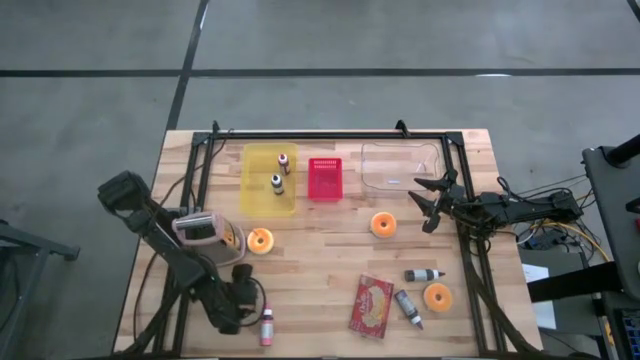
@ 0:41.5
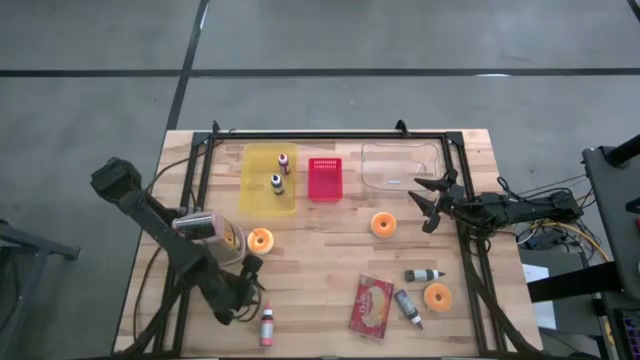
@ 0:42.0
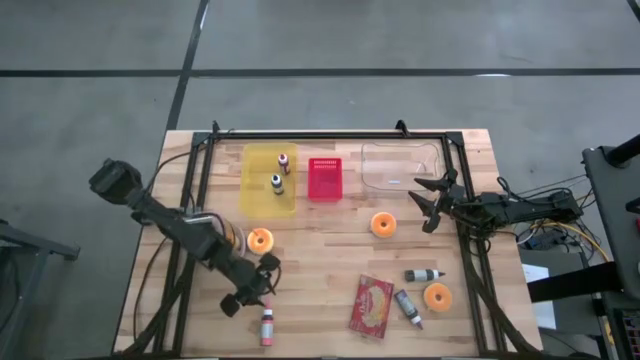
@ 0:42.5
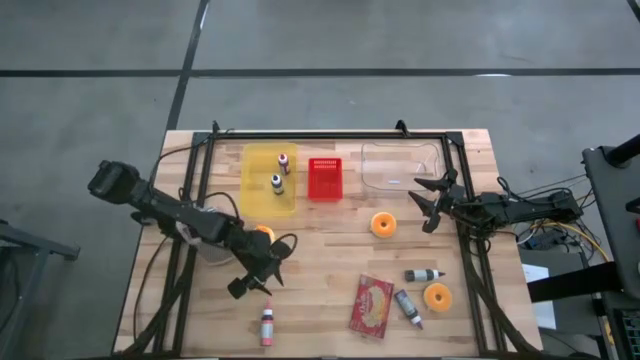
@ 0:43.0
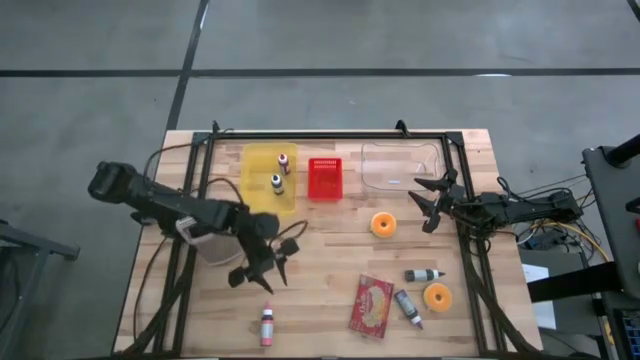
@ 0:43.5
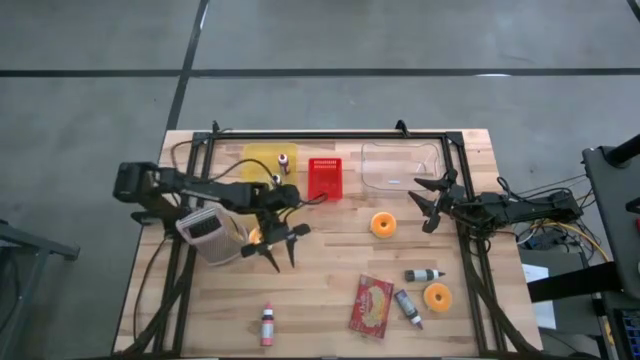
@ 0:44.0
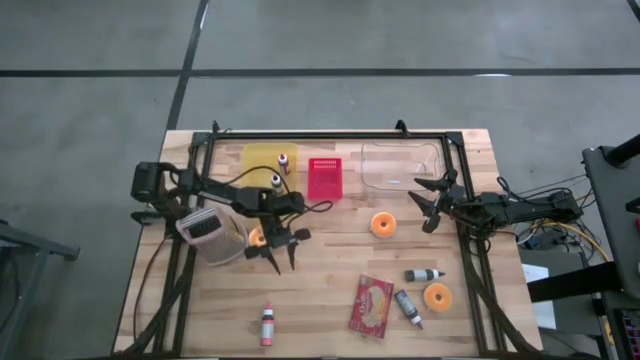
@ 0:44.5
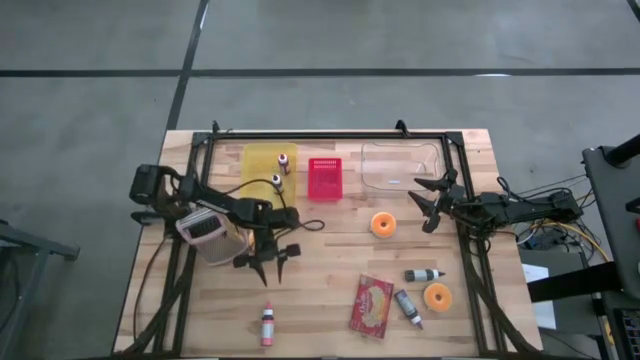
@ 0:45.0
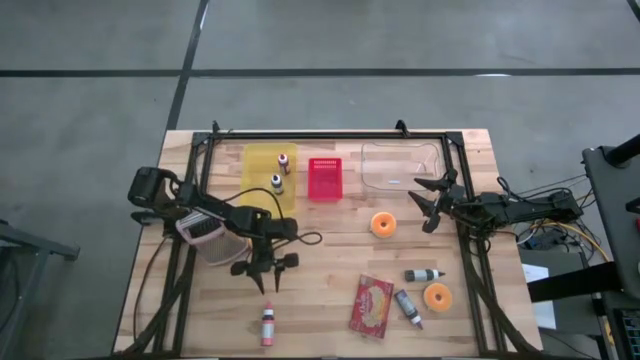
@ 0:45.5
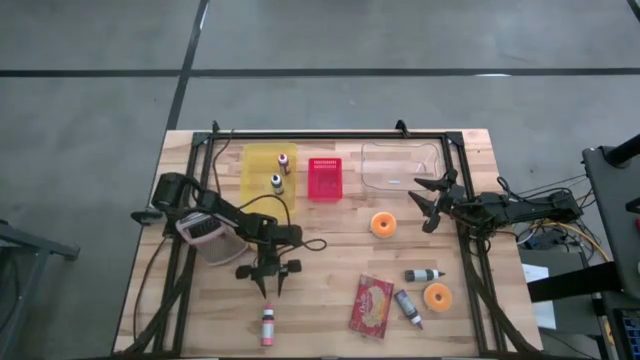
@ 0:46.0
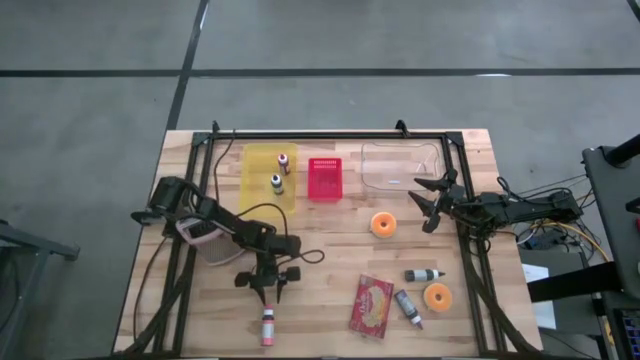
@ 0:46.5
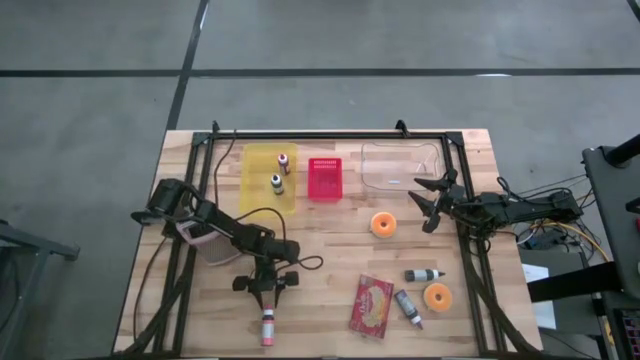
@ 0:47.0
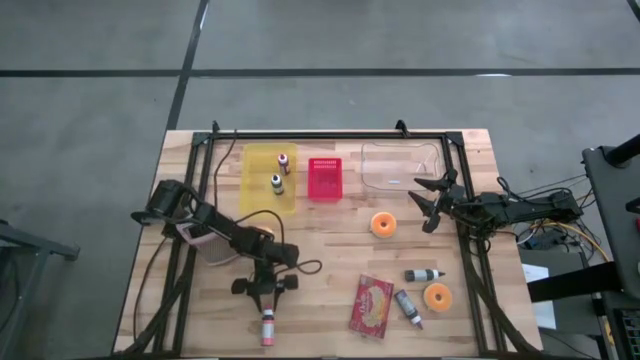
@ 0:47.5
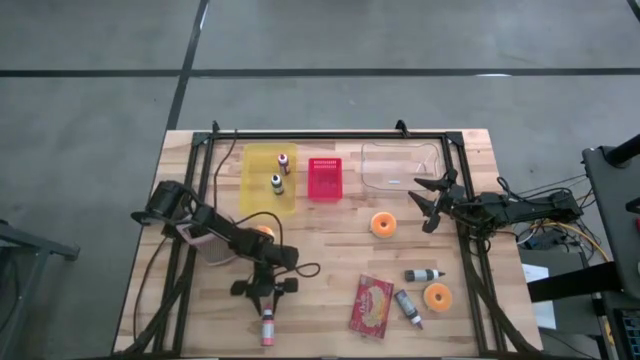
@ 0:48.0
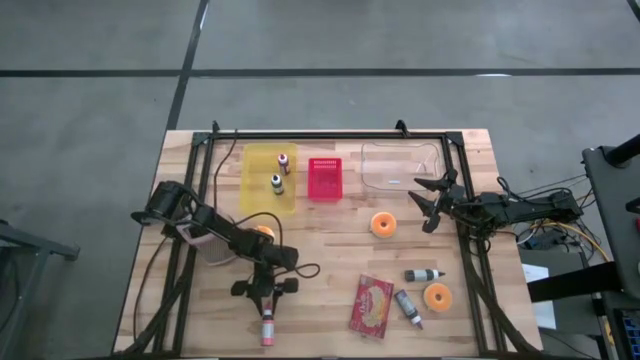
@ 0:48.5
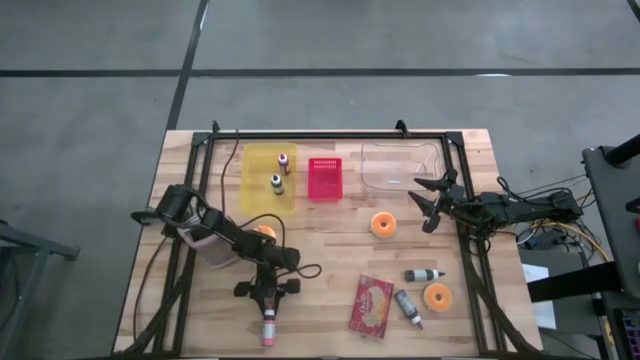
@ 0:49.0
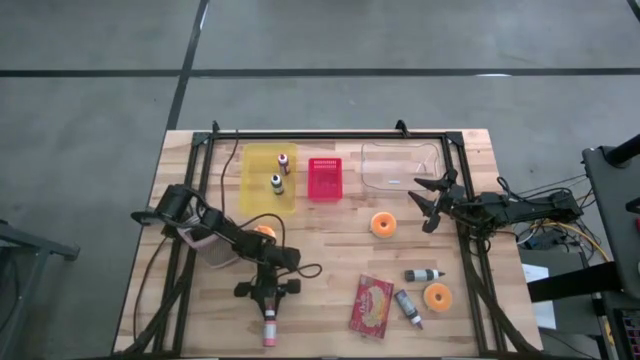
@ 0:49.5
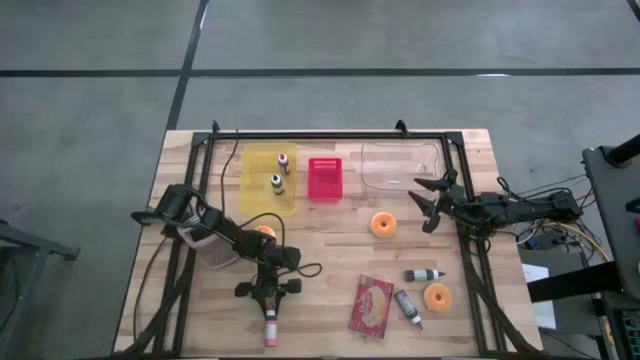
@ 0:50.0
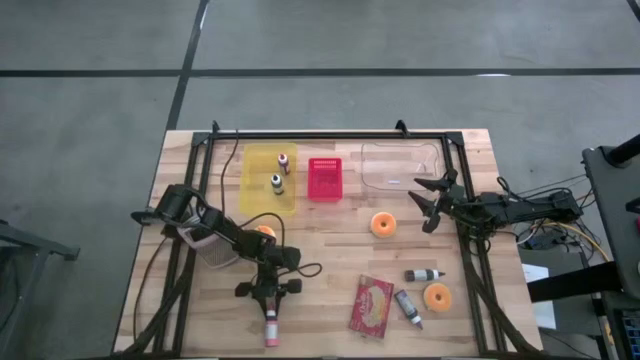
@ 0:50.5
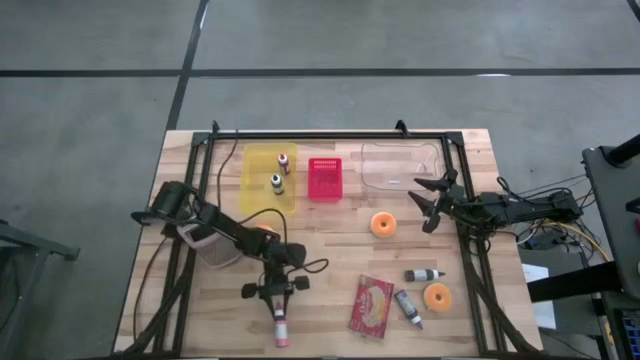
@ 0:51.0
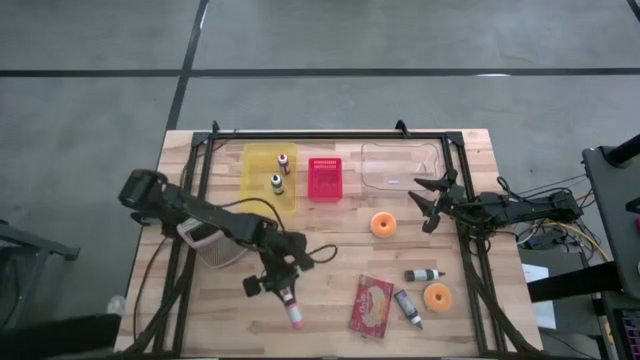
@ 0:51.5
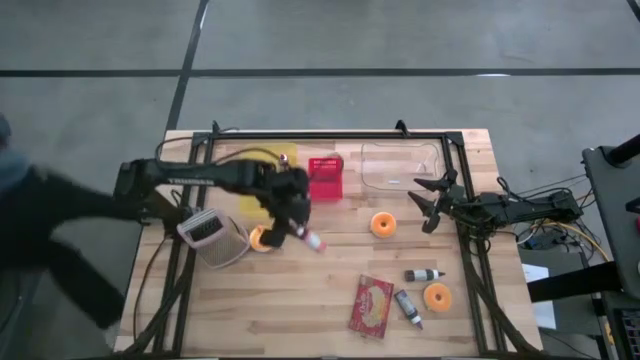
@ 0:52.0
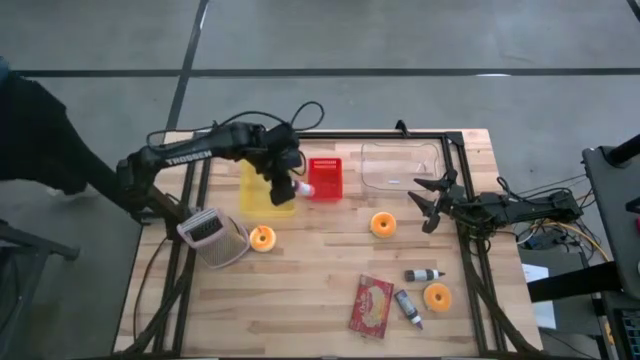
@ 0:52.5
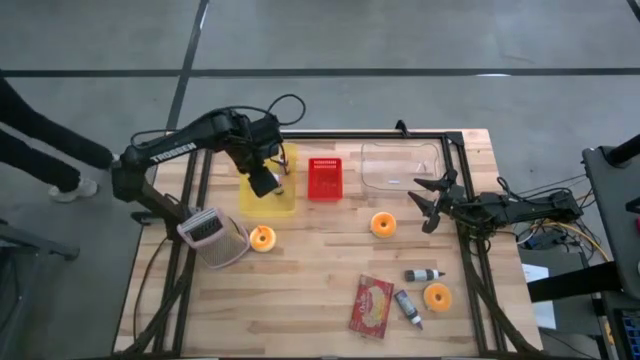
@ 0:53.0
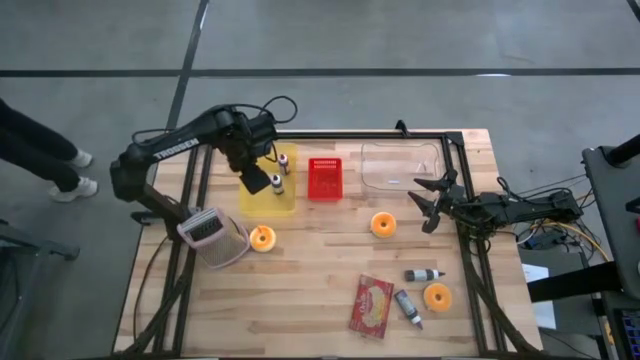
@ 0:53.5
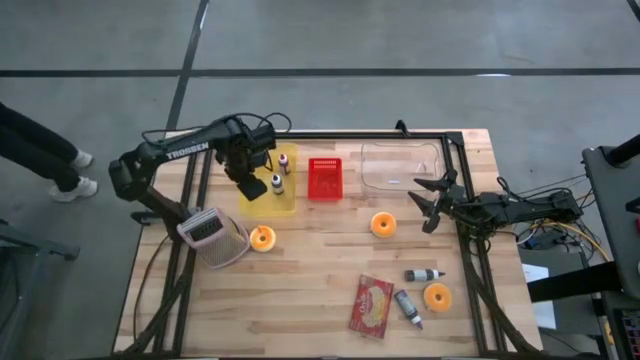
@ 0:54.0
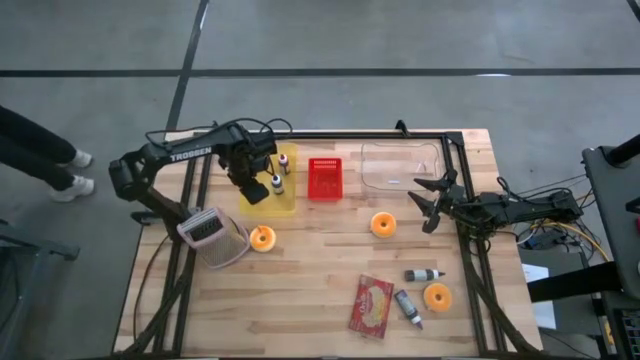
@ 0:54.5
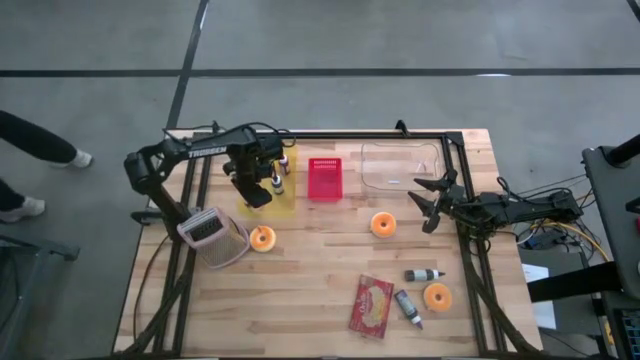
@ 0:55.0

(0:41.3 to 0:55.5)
Task: Pick & Place Food Item
Put the pink food coloring bottle into the yellow bin

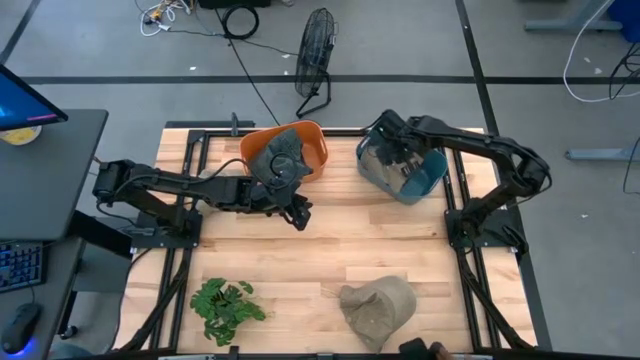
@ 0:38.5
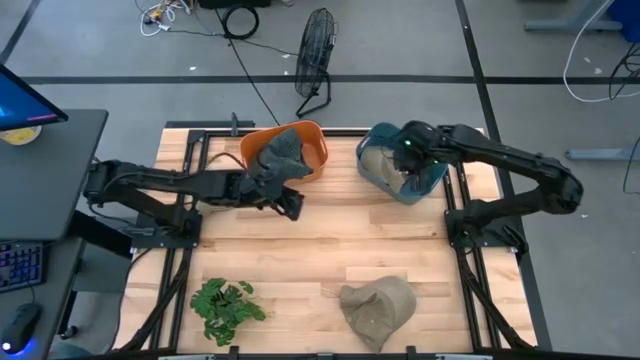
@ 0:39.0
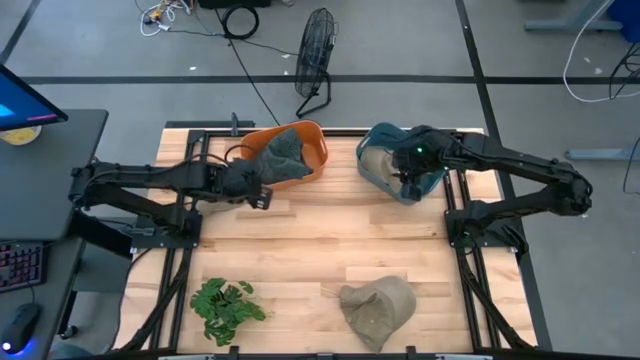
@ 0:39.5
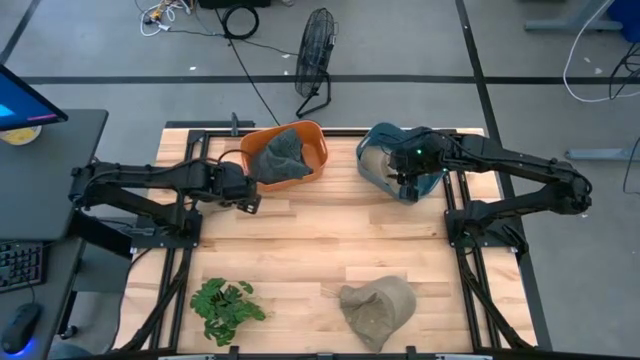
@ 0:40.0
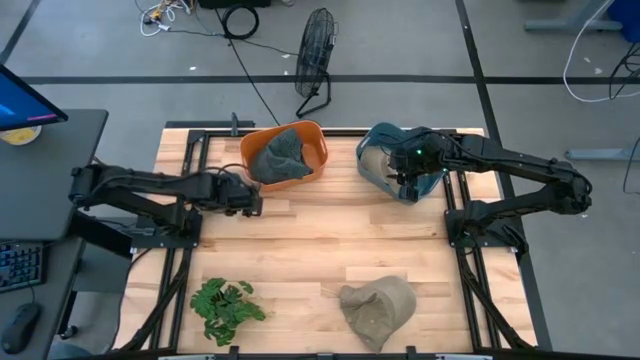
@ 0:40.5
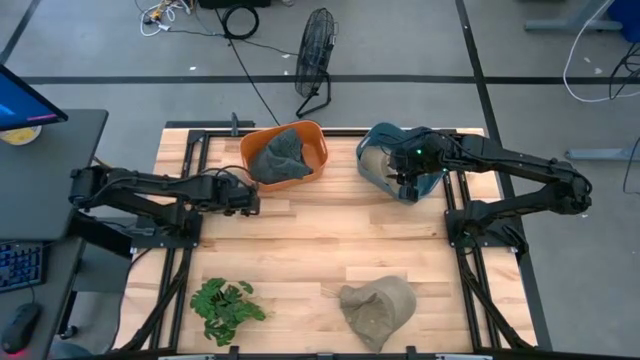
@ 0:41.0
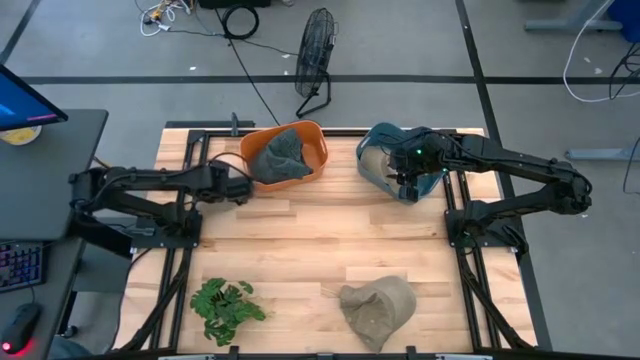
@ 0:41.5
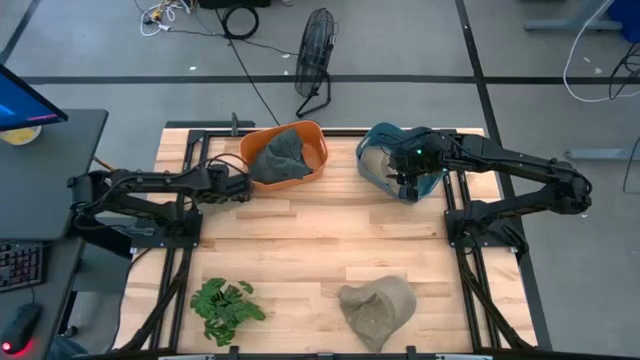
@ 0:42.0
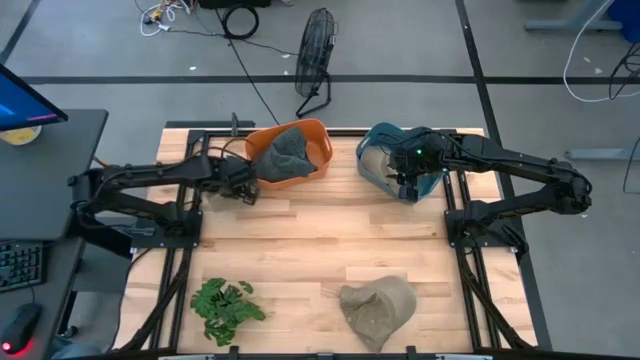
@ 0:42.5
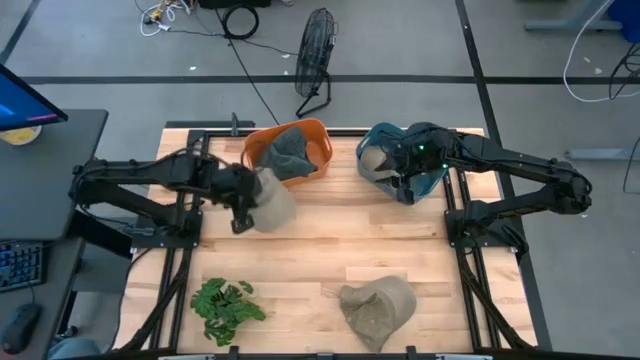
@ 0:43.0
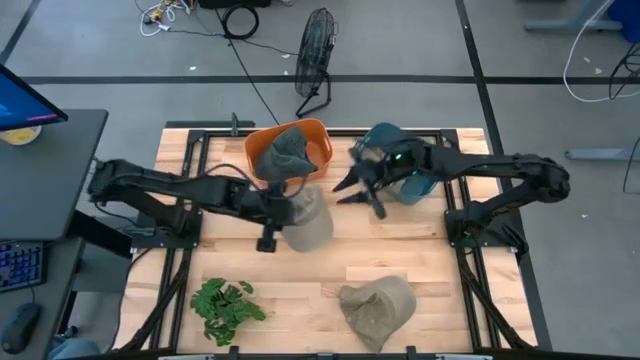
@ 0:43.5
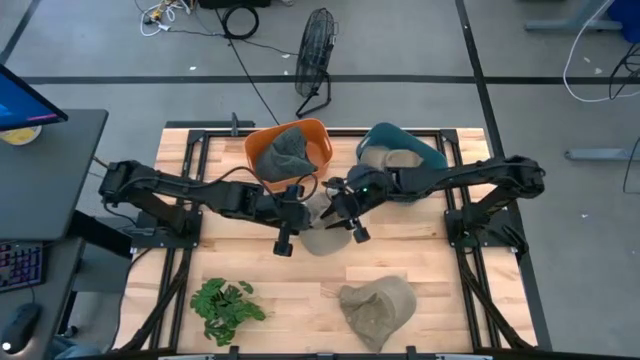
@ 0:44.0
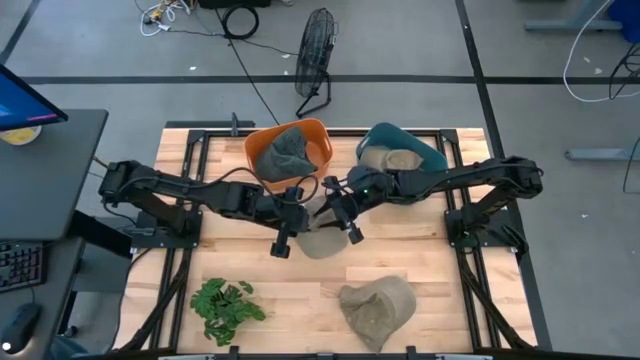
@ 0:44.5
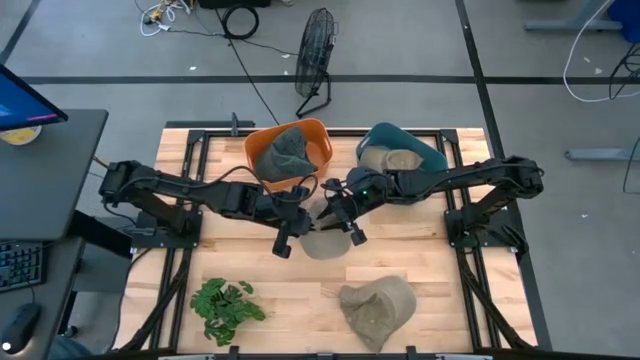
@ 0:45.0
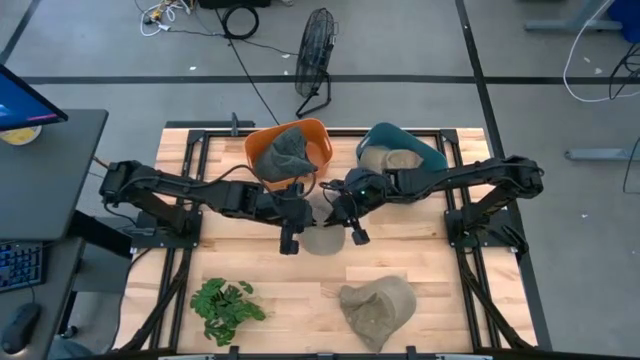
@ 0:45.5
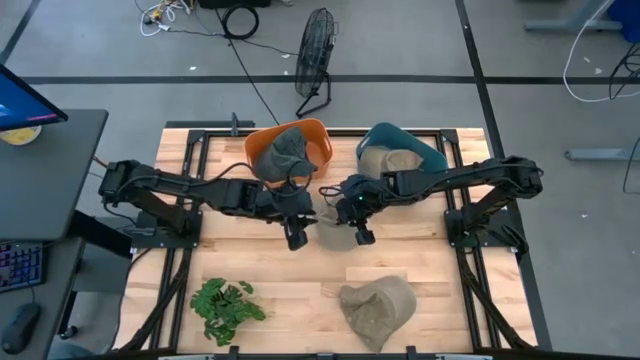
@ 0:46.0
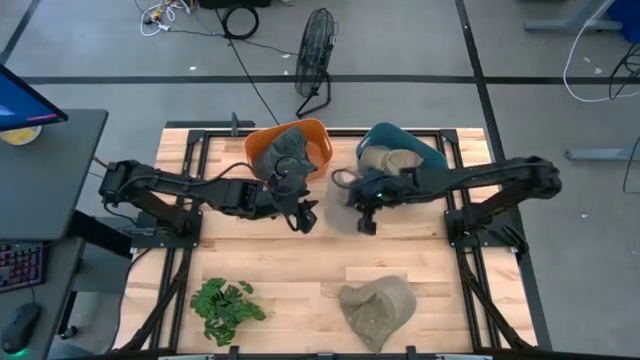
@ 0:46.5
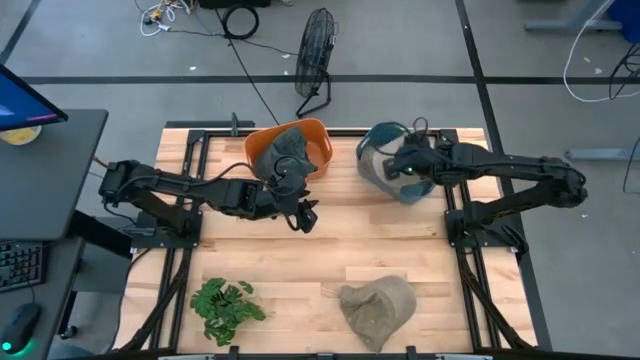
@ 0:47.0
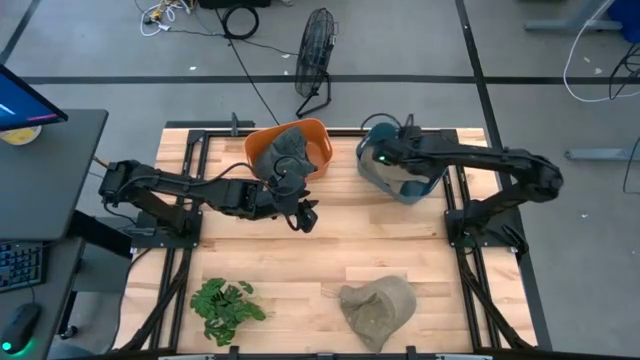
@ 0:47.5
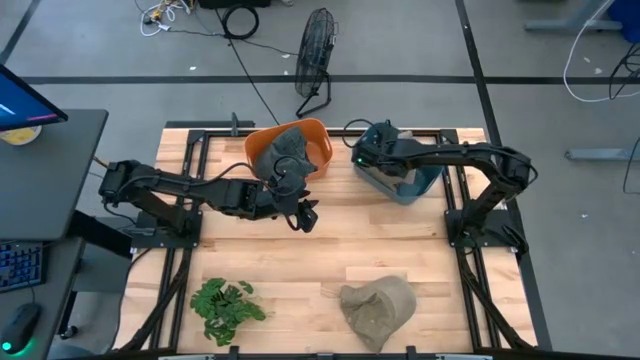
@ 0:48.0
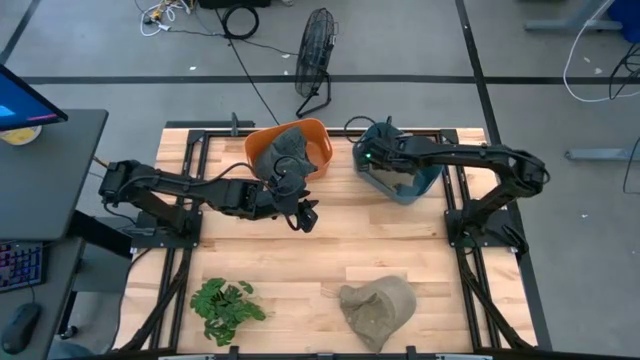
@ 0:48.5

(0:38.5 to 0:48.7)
Task: Pick & Place hat
Put the top brown cap into the blue bin
